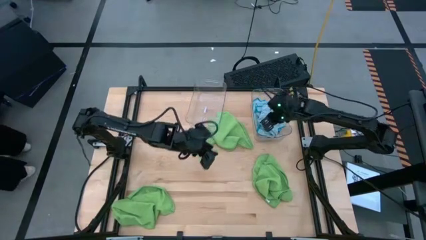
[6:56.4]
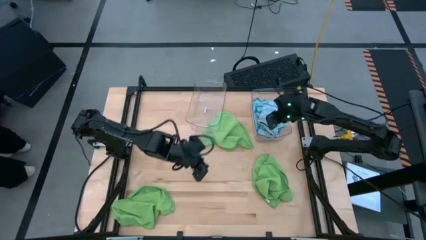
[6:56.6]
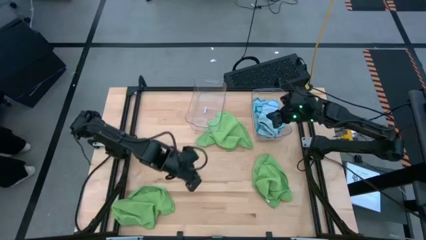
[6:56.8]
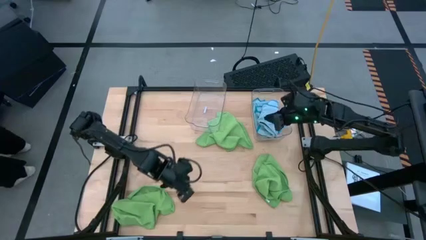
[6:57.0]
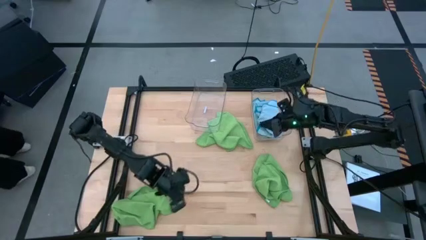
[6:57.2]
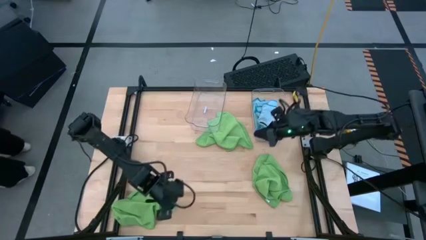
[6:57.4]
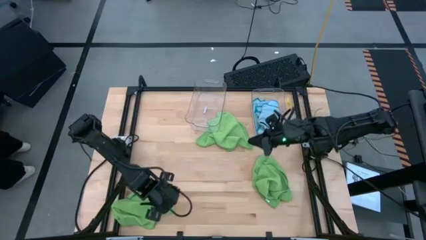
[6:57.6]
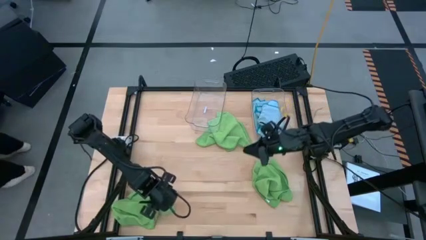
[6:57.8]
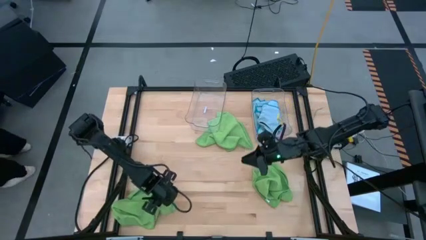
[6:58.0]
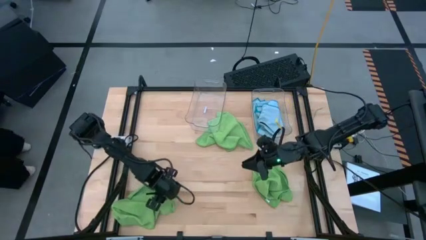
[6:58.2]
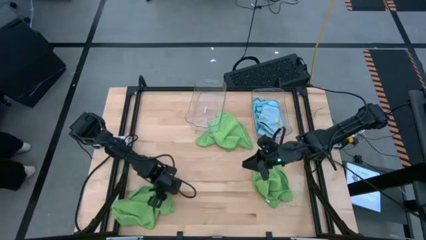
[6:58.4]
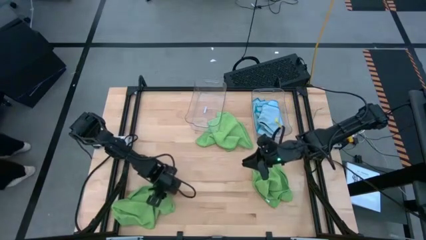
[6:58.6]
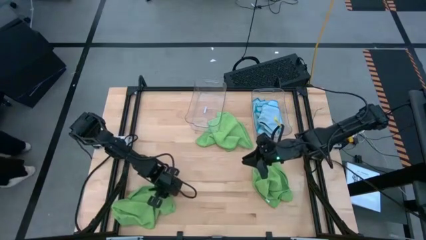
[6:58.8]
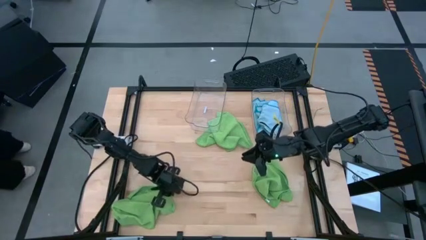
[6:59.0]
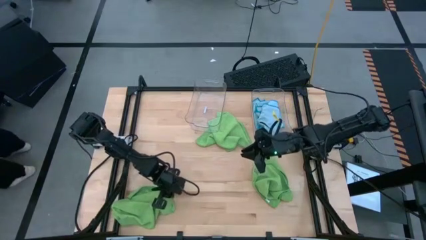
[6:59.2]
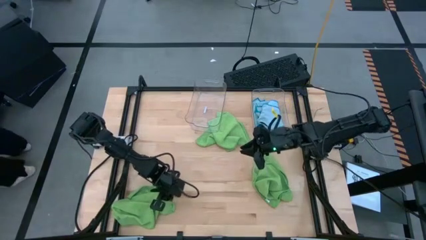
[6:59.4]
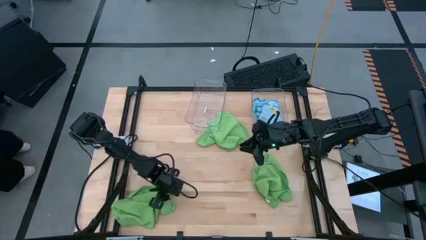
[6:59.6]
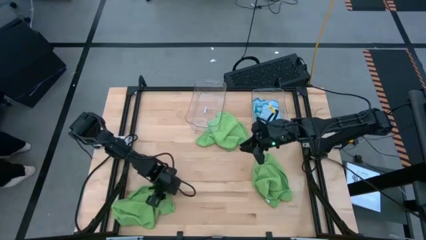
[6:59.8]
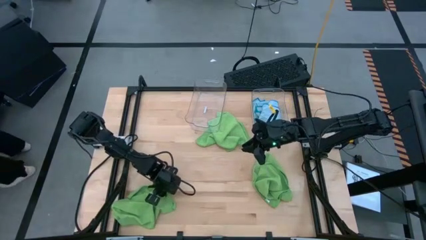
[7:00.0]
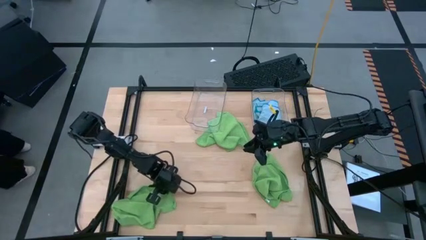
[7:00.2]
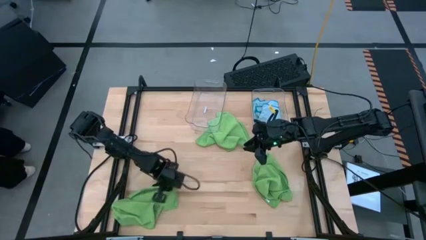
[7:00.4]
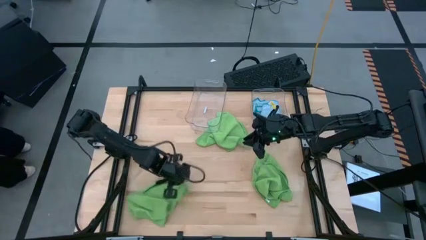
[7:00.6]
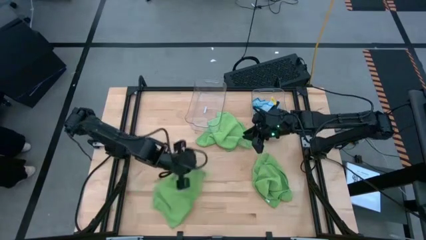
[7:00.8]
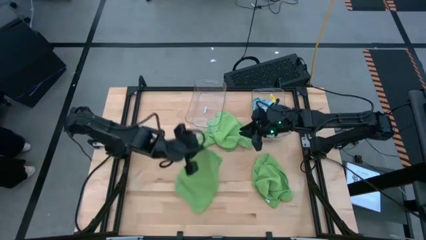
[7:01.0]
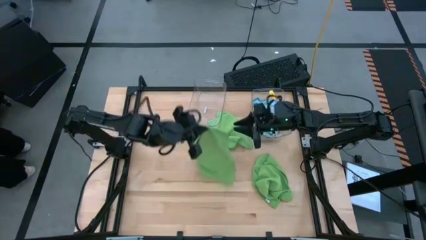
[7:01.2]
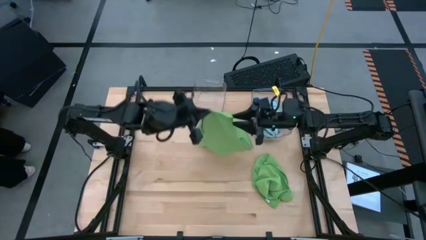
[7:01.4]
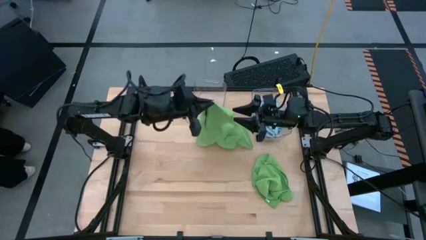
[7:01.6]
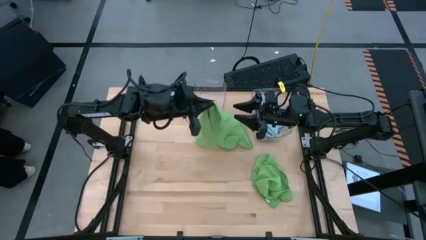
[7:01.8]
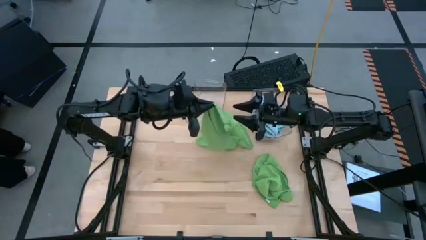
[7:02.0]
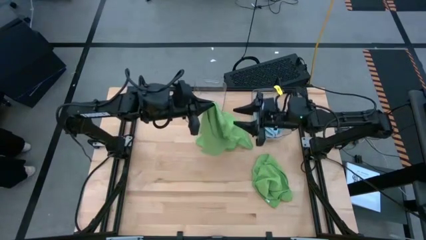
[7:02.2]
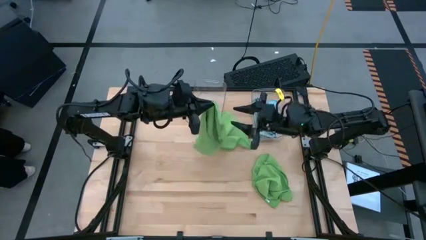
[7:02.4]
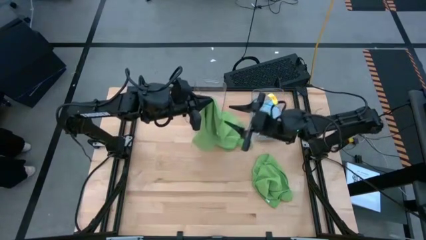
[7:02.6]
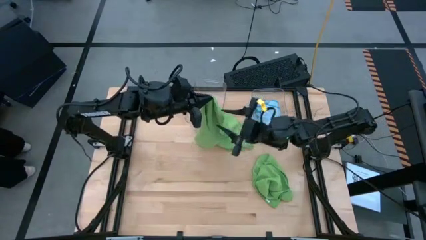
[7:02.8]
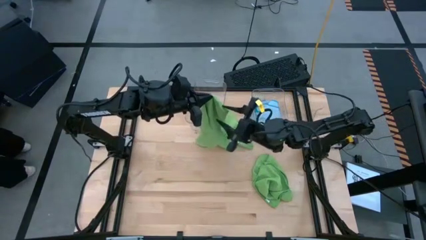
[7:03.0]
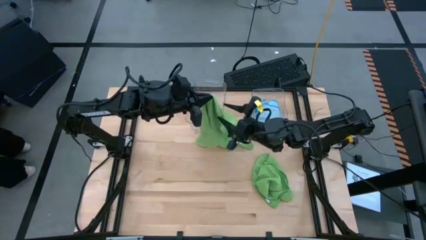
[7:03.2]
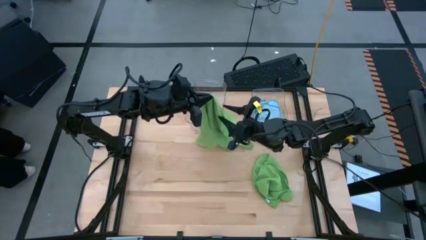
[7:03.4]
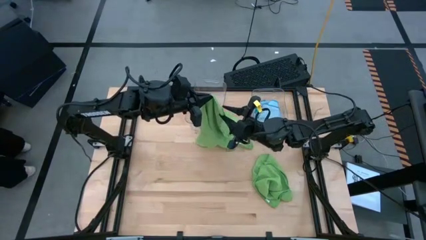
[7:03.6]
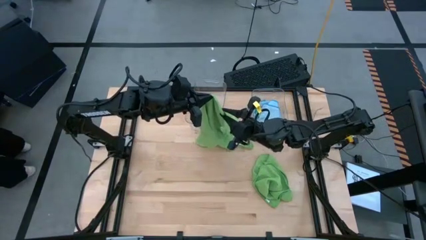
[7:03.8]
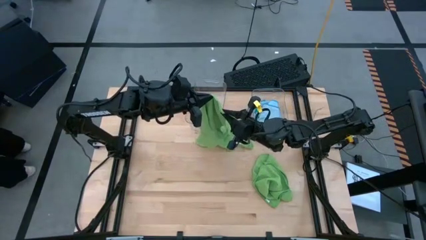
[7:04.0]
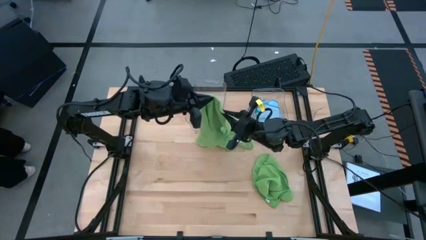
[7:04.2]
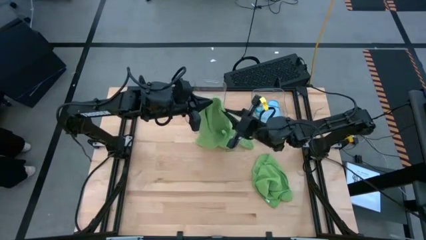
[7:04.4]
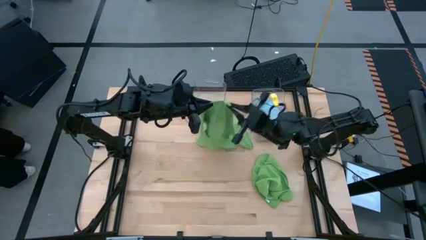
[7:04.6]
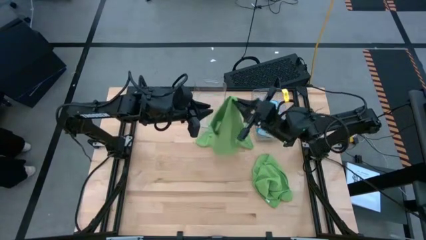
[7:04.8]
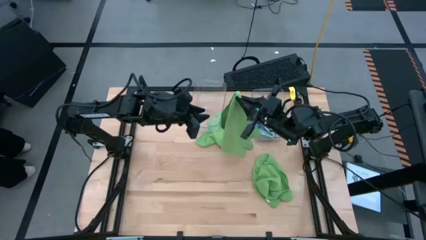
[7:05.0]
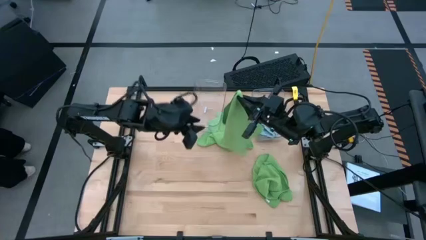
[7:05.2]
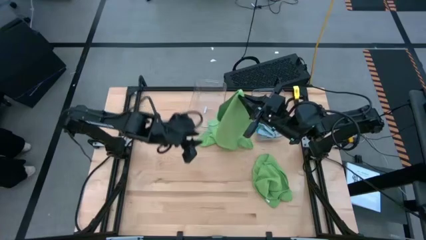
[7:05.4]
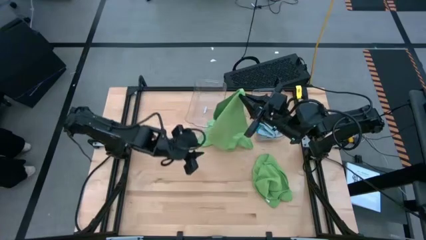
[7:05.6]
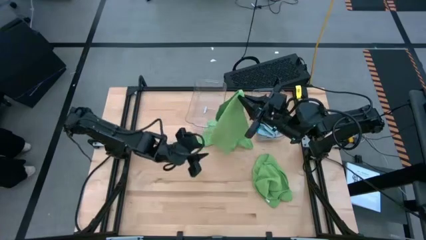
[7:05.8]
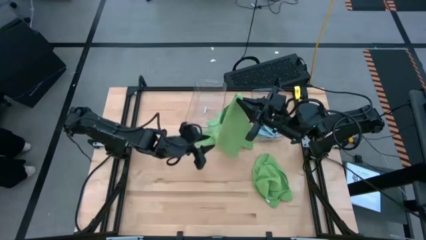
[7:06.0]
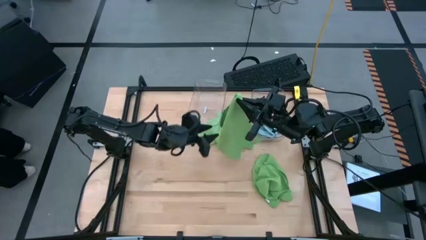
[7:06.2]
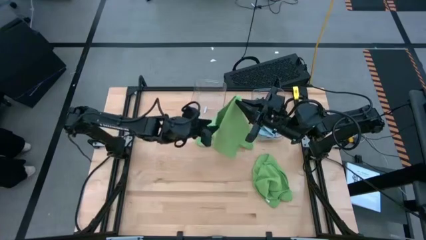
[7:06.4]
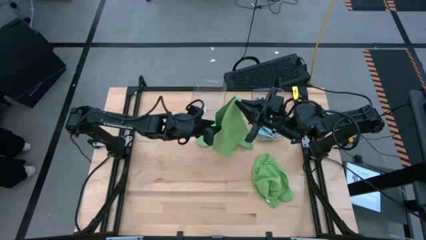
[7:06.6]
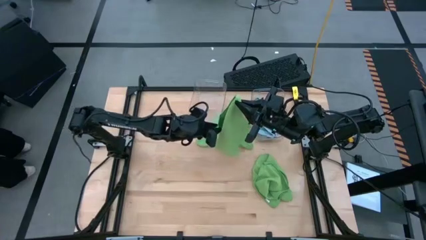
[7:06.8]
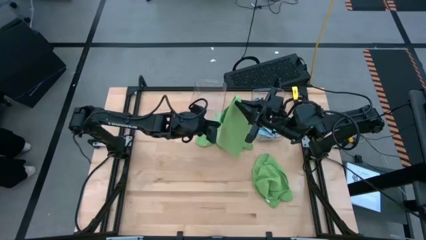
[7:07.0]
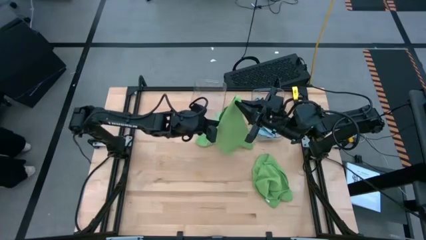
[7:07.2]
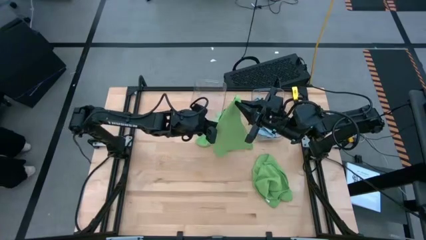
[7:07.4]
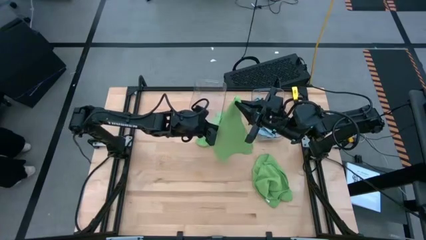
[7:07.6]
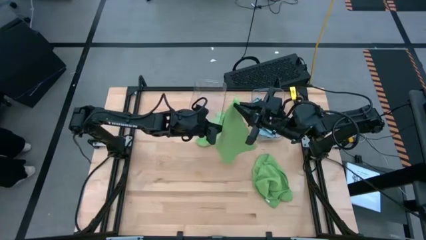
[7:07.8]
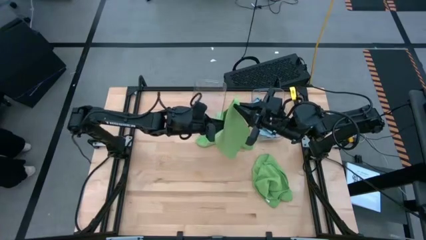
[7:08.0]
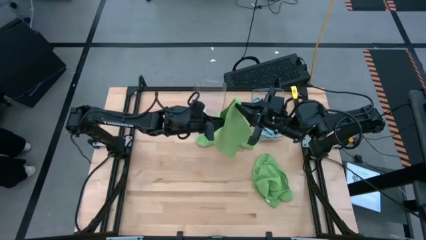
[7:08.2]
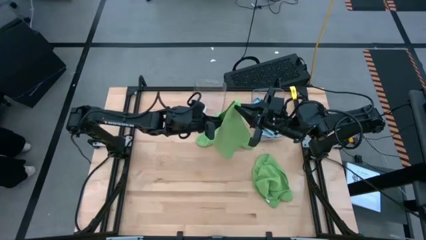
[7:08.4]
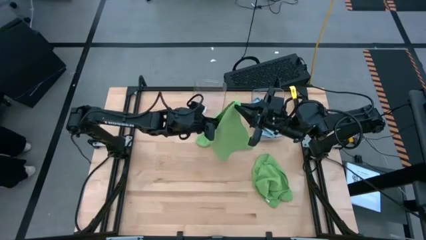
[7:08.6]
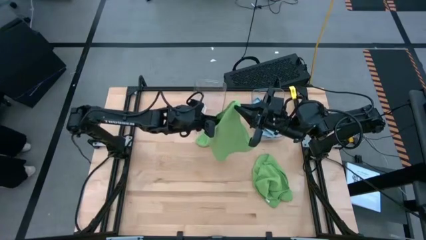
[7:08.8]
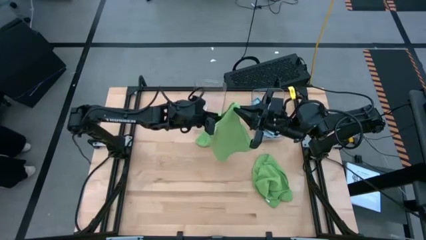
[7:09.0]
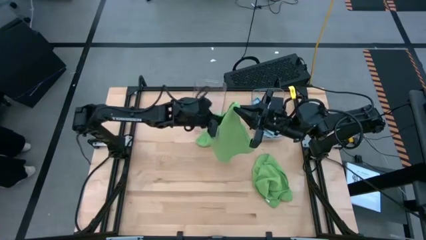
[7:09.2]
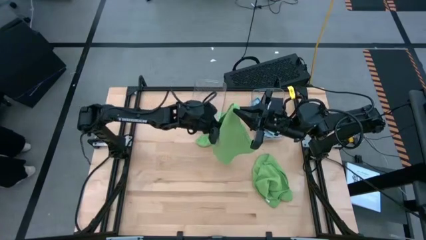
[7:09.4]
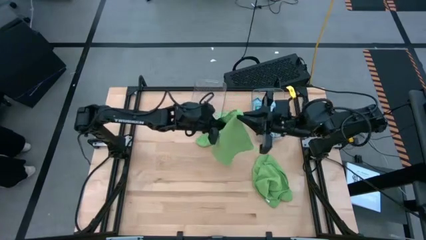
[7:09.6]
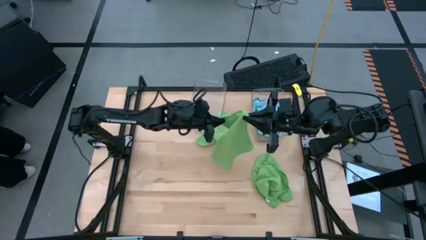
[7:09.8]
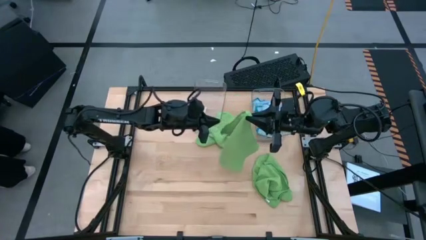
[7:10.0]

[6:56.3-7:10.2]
Task: Fold microfiber towels
Fold the bottom left green microfiber towel

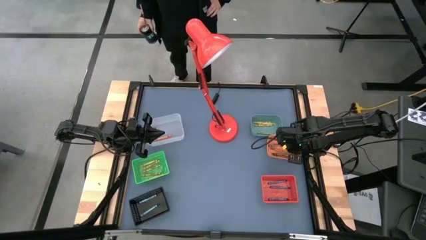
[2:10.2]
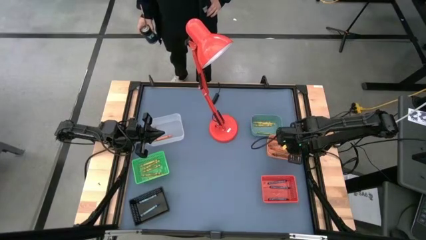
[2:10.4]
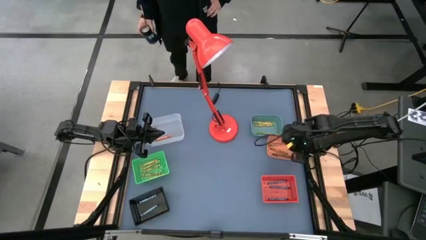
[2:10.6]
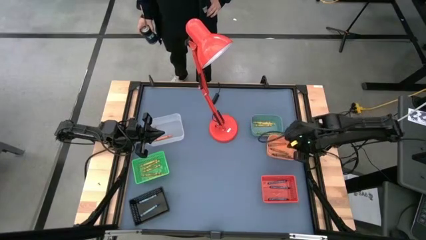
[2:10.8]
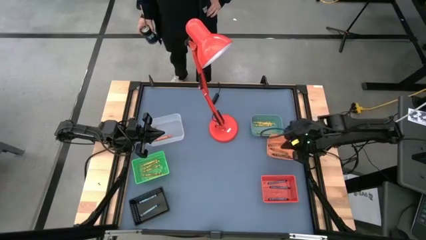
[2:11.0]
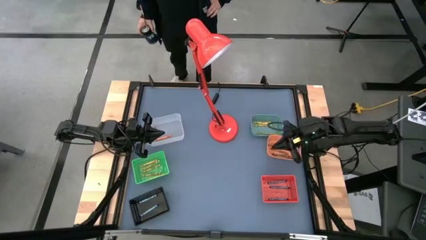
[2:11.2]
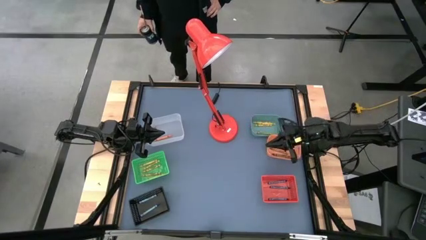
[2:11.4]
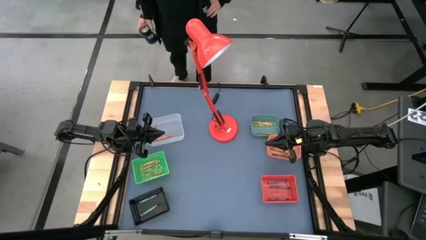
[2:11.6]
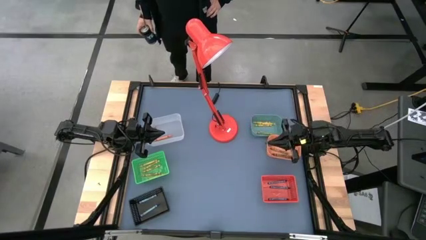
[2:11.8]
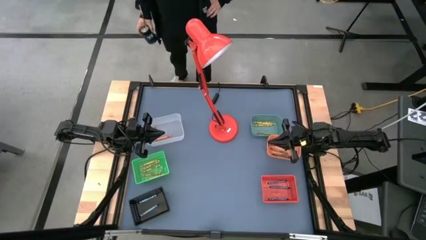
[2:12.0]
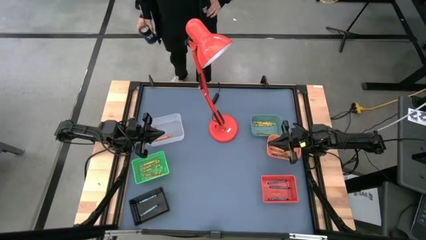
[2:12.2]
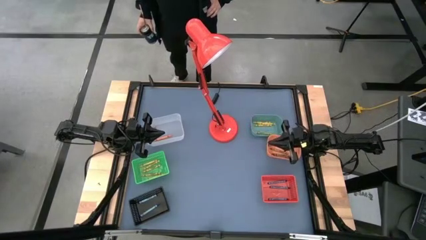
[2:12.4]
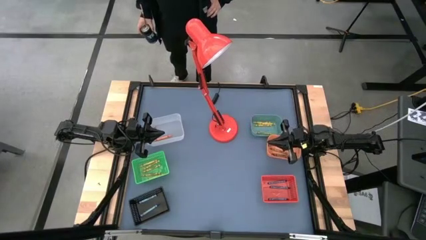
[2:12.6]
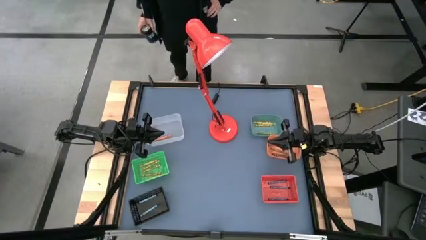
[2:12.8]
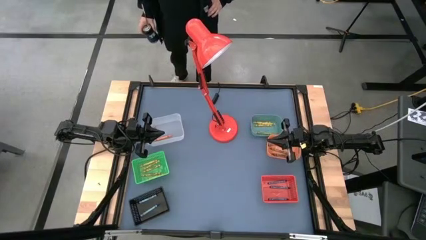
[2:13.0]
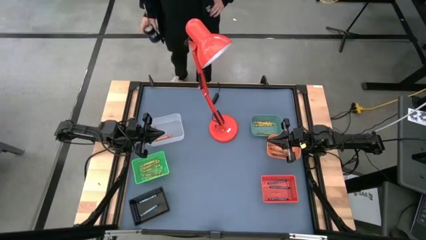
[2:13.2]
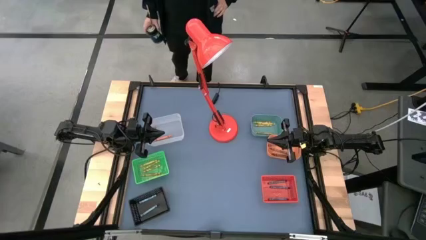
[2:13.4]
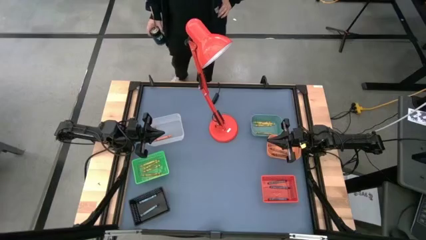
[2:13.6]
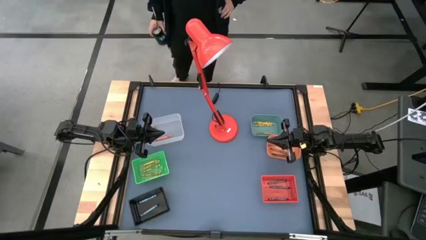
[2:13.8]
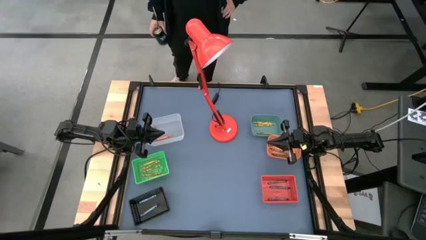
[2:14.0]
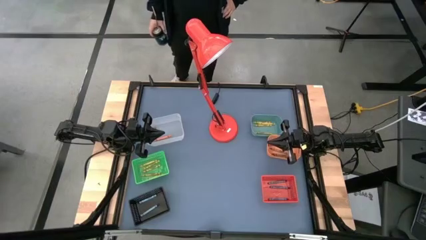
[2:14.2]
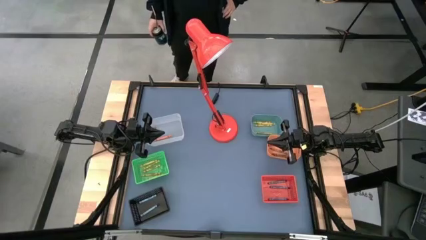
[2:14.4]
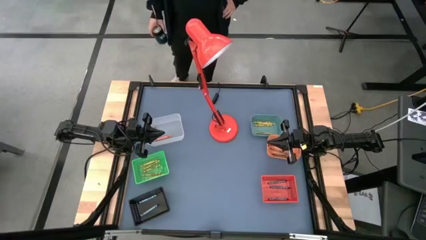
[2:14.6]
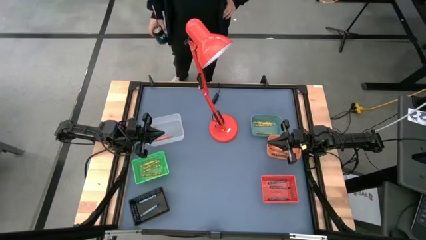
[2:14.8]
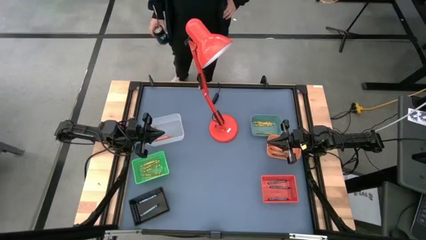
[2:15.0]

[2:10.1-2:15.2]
Task: Sort crayons
Return to Home Position
